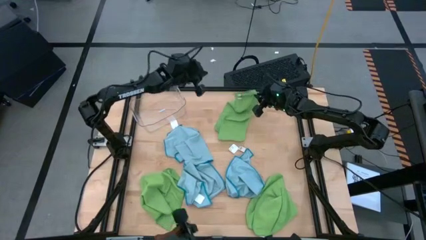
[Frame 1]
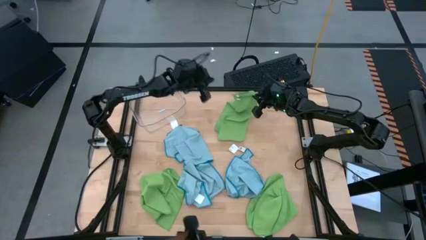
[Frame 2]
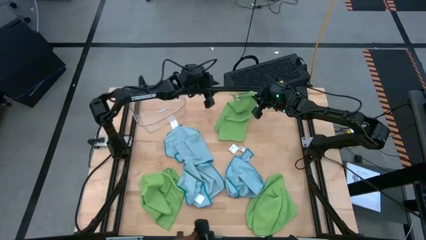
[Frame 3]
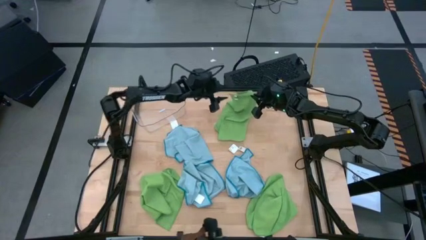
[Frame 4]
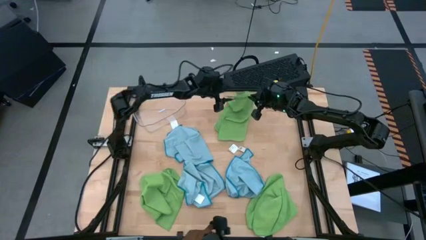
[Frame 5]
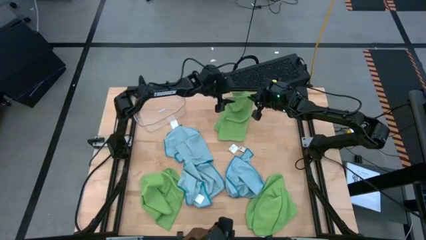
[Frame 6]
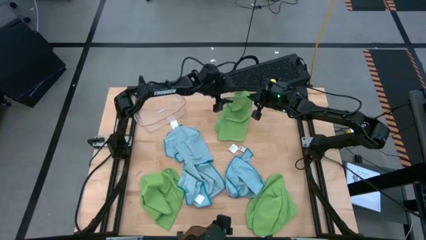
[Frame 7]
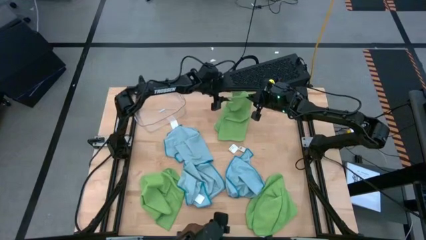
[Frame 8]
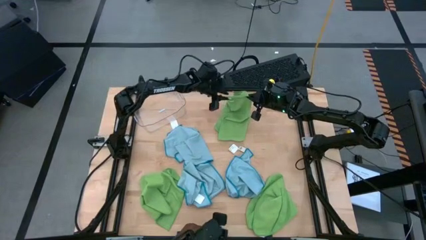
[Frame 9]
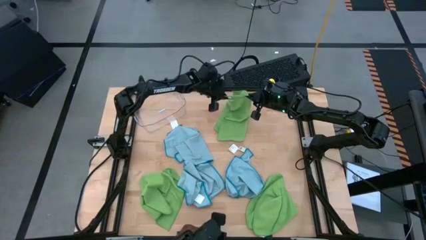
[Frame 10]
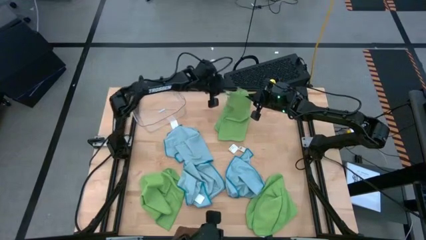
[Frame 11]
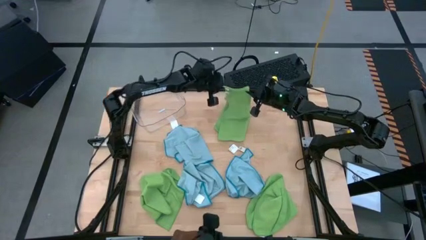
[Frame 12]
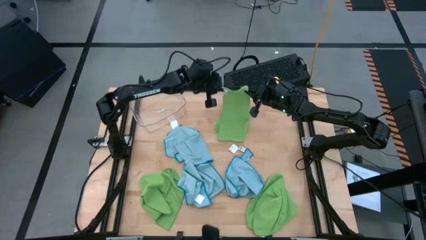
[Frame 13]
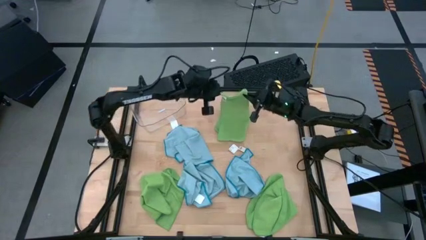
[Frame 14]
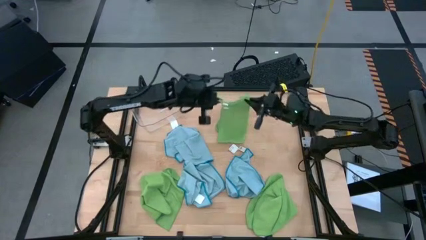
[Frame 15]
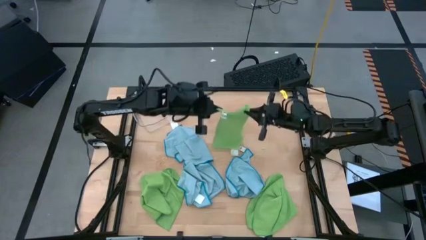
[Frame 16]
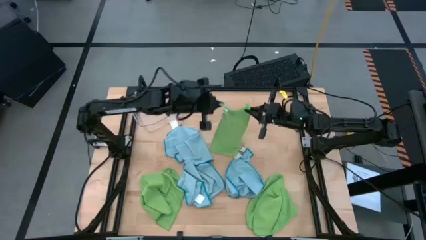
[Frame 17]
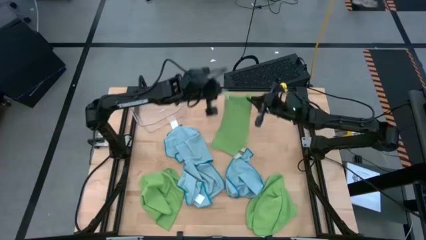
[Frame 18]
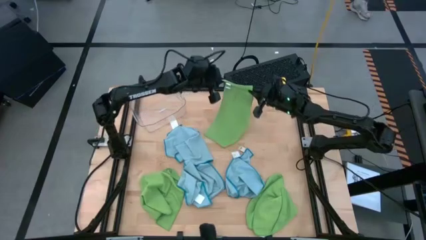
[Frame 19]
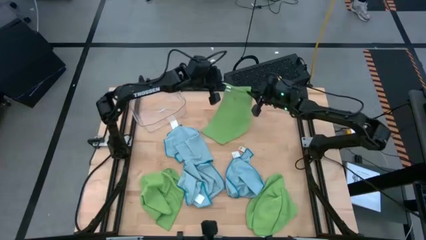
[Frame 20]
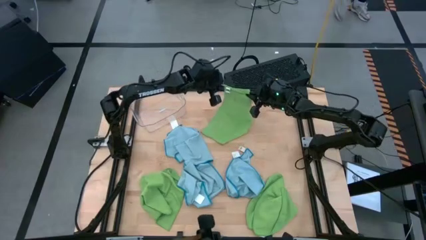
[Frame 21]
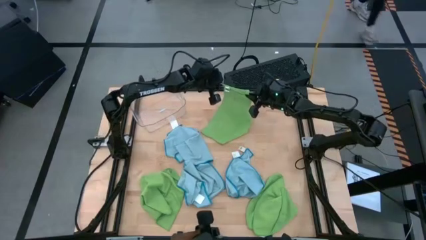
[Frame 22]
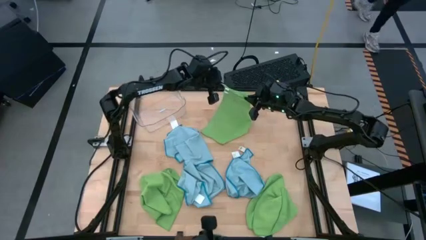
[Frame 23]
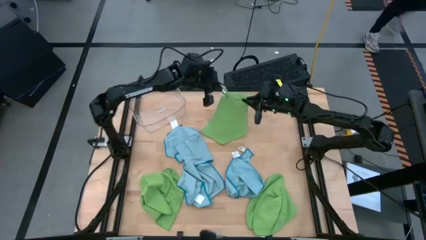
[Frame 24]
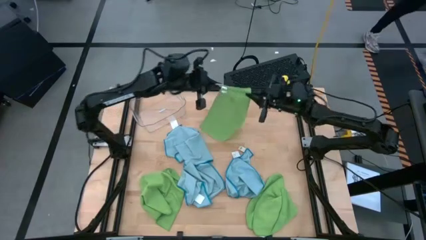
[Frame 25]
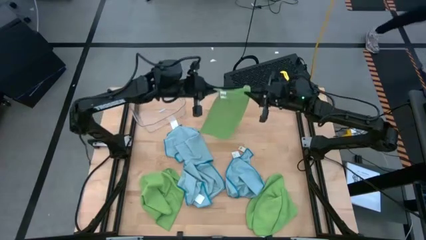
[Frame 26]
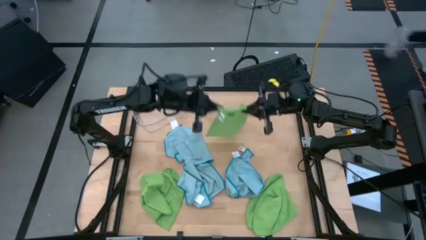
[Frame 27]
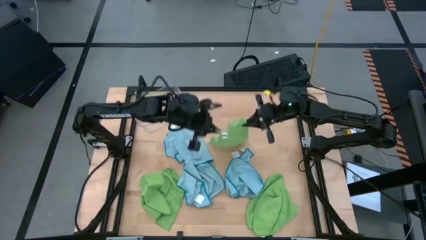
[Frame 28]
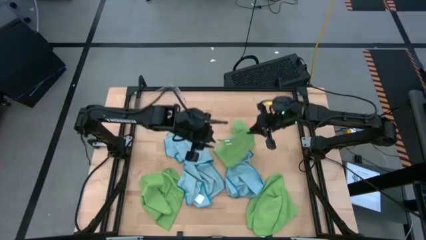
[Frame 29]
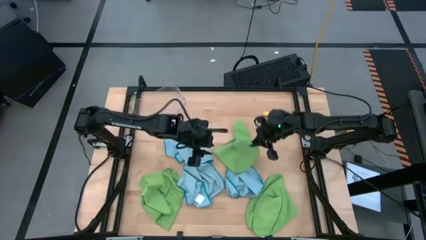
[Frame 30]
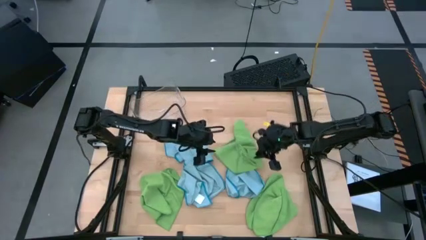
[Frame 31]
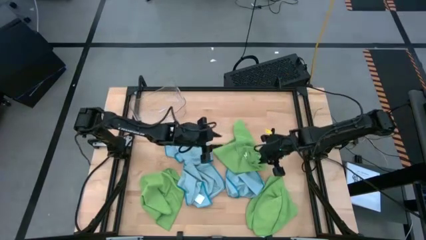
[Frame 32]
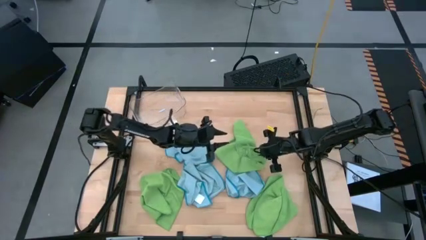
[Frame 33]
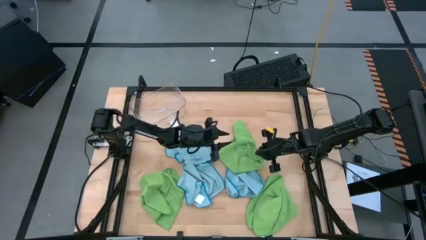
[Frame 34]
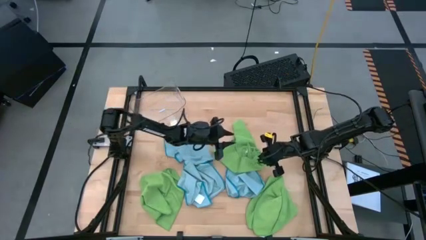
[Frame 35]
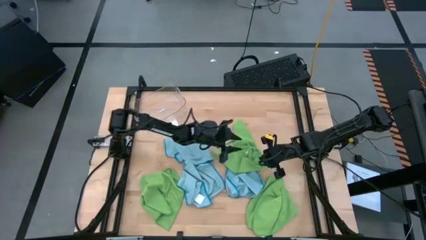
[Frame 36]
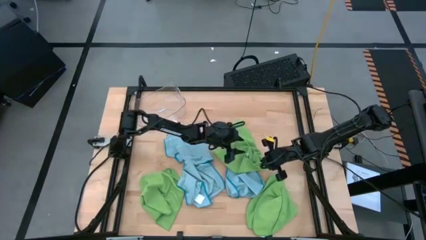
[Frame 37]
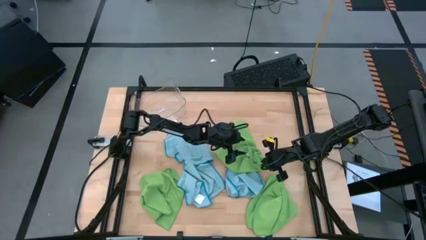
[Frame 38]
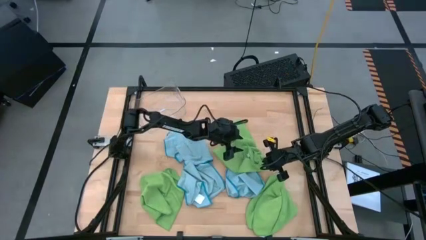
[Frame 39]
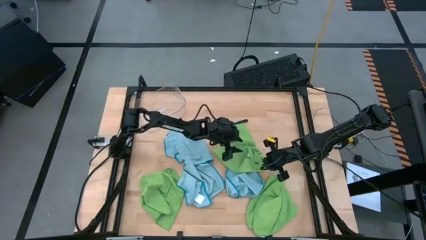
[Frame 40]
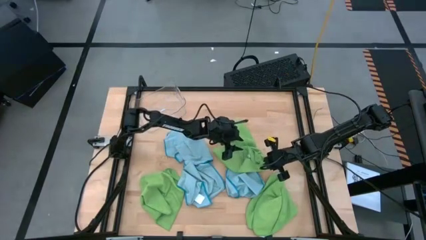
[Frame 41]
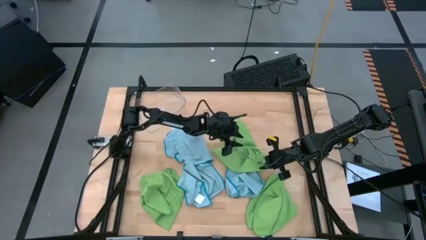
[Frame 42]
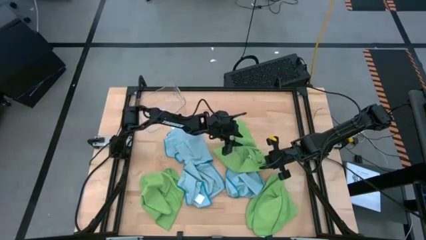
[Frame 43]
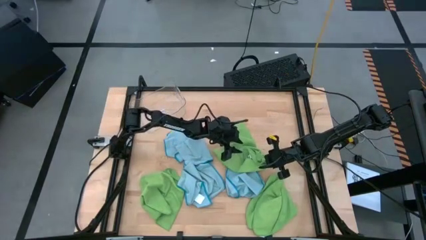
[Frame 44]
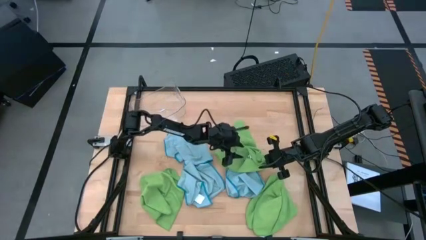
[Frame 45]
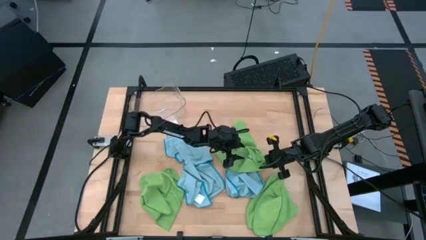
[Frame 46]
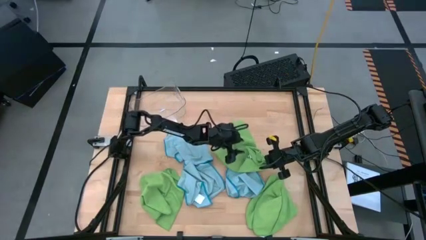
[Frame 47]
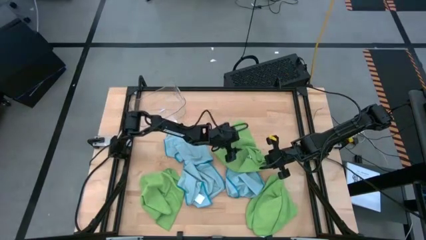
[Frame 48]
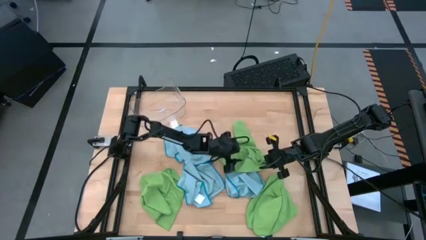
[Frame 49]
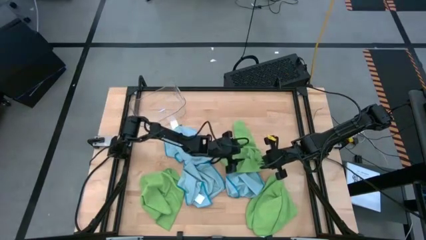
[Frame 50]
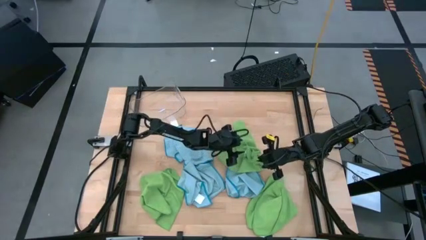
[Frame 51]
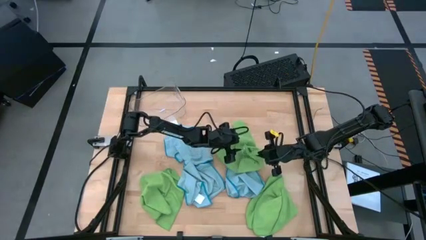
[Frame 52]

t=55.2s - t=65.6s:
Task: Fold microfiber towels
Fold the top right green microfiber cloth

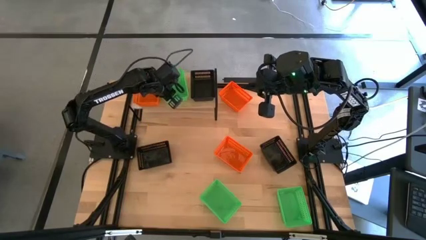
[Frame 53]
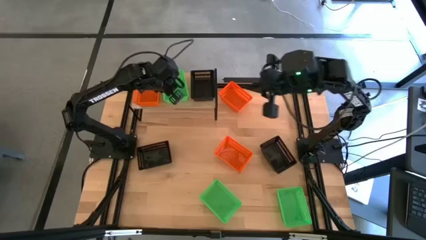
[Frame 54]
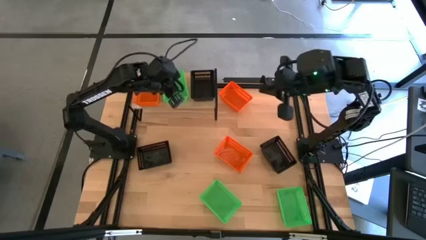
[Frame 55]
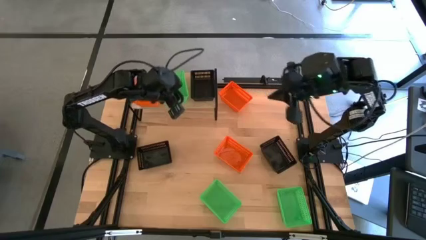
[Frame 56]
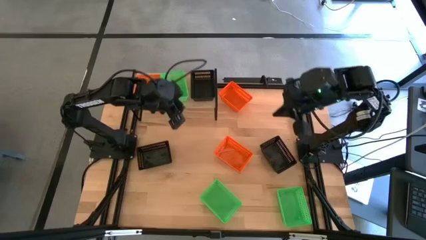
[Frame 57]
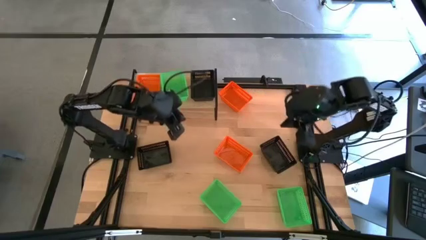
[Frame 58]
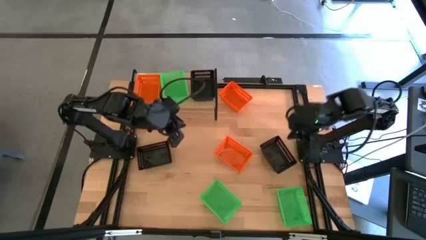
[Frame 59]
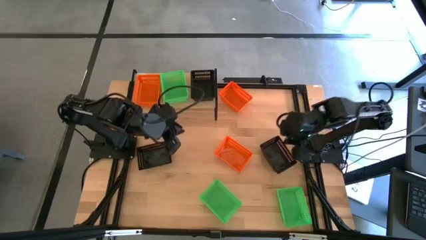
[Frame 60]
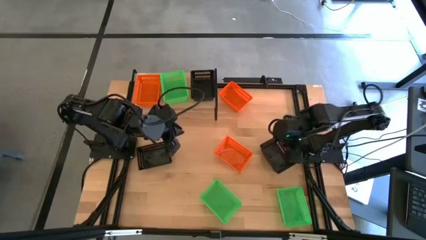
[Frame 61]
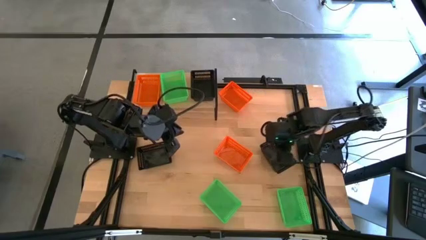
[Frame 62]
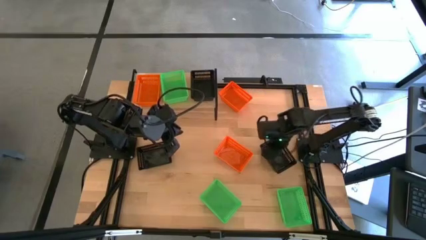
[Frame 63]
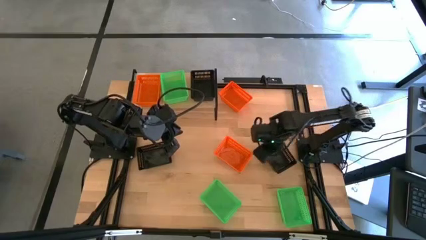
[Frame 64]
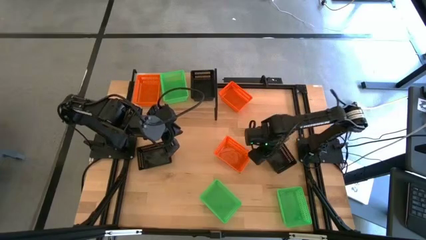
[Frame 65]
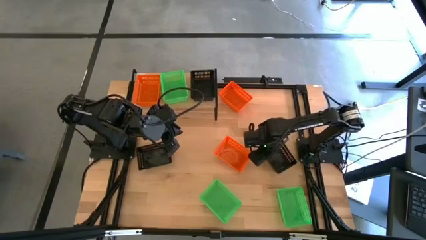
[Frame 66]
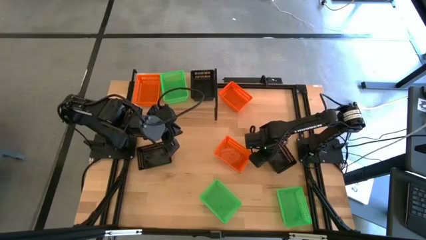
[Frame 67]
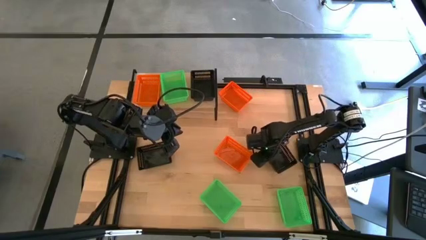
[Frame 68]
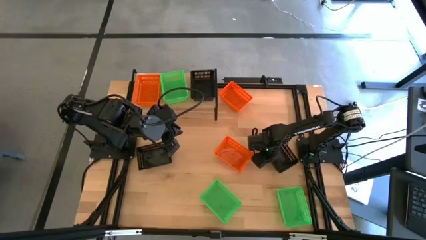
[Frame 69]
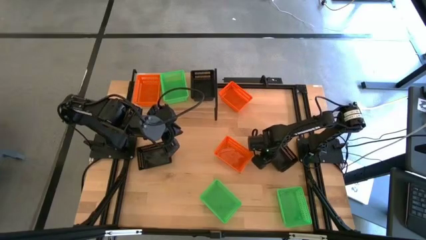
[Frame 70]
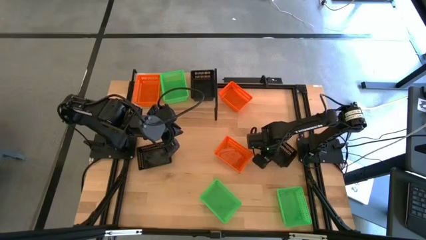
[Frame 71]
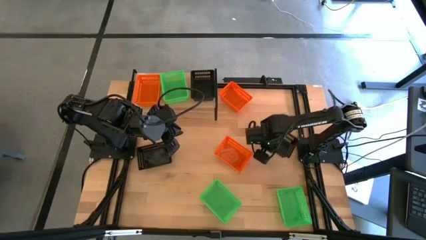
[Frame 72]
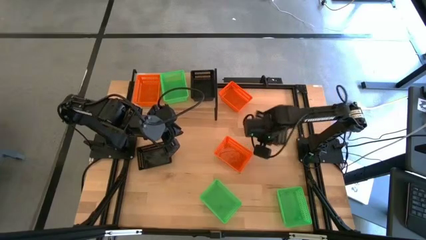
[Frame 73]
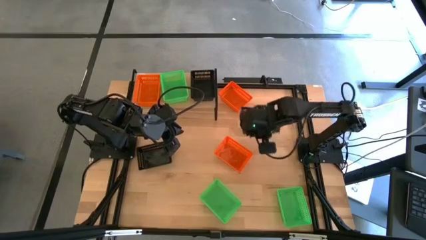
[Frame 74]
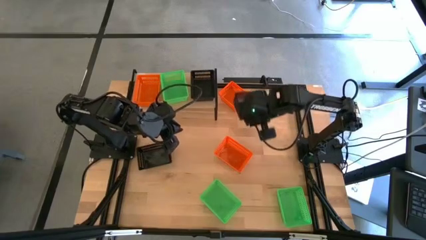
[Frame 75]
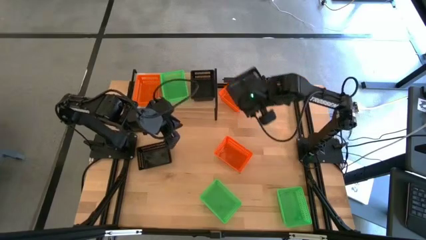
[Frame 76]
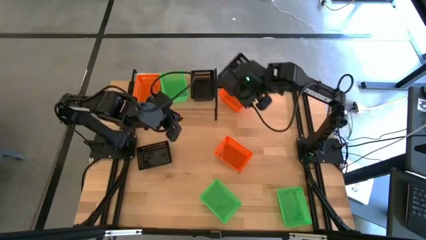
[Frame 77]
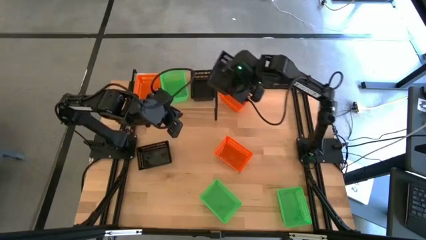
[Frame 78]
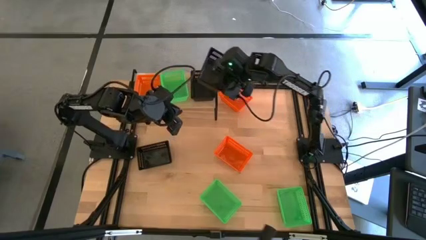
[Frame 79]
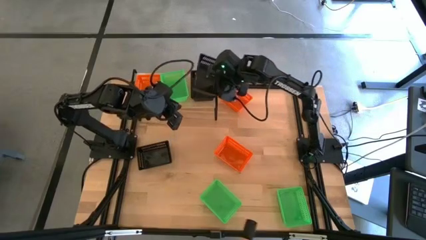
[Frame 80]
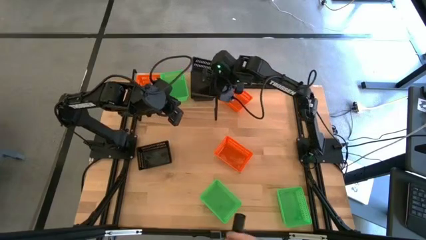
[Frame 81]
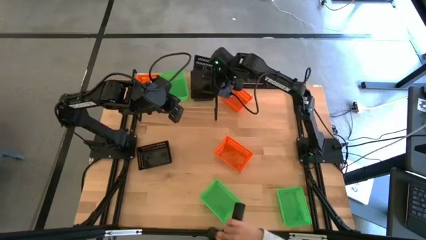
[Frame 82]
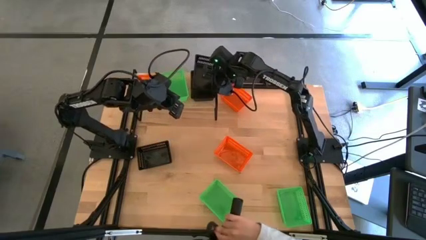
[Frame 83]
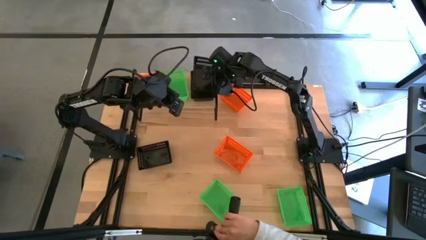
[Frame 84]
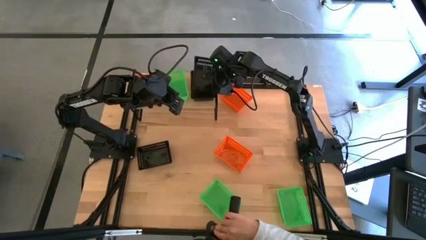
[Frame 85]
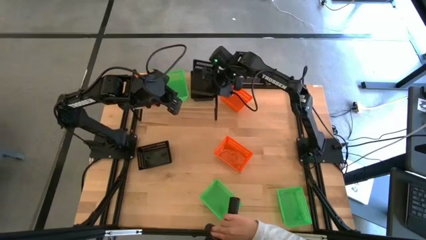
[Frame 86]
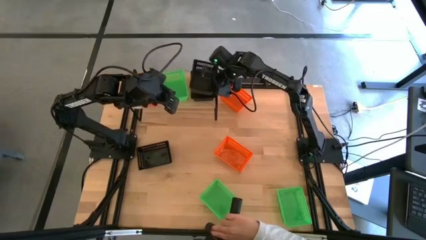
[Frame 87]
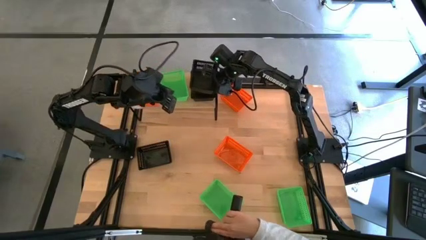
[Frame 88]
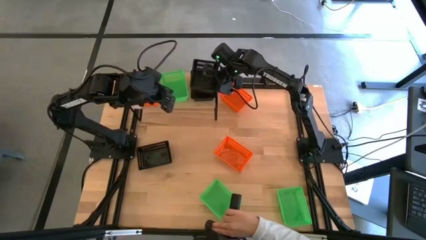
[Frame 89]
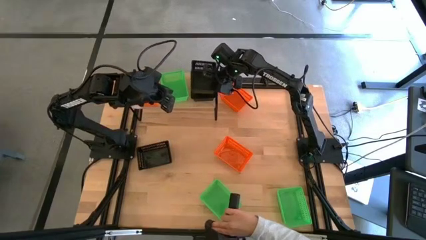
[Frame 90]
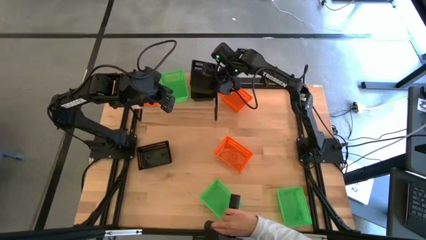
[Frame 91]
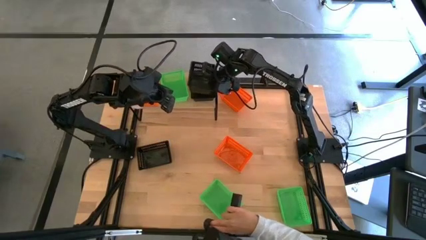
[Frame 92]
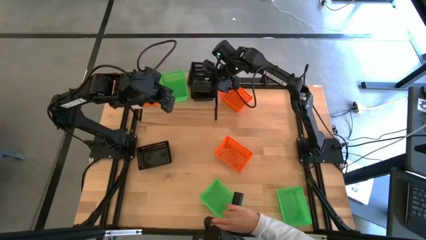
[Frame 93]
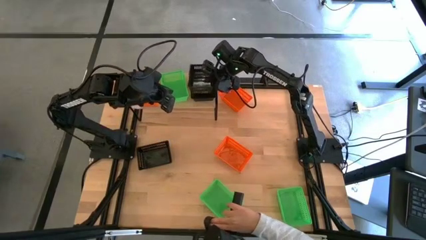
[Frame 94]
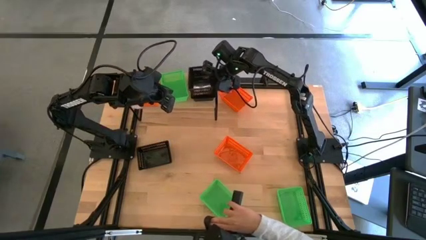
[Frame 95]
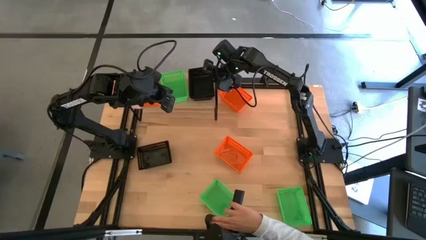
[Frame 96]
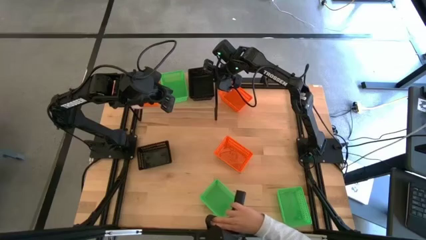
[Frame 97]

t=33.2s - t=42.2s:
Task: Stack baskets on shelf by color
Stack the right black bin on the black bin on the shelf
